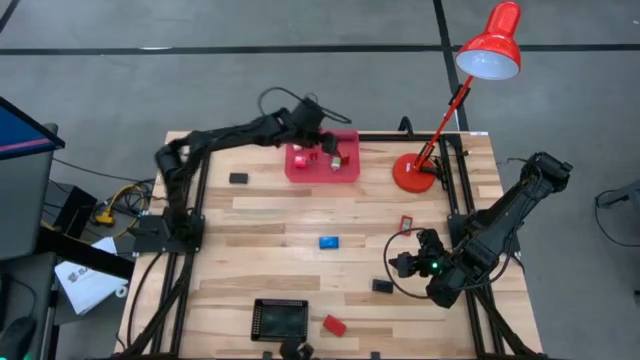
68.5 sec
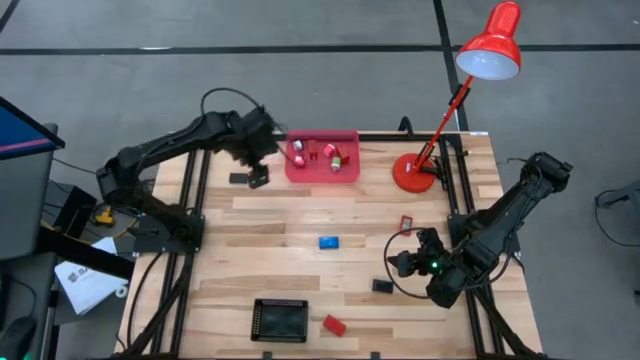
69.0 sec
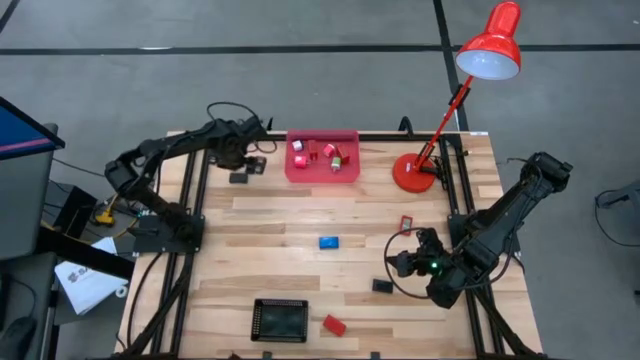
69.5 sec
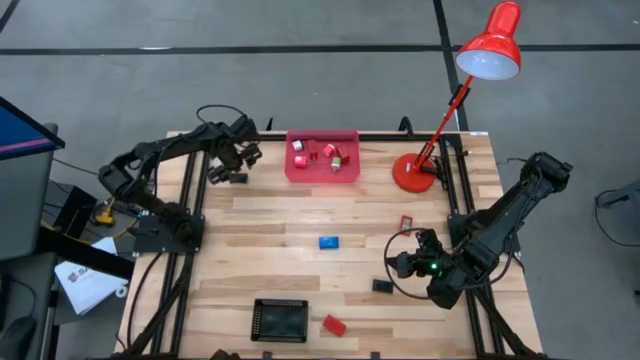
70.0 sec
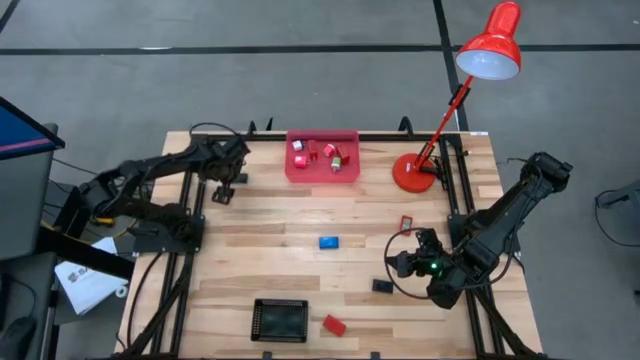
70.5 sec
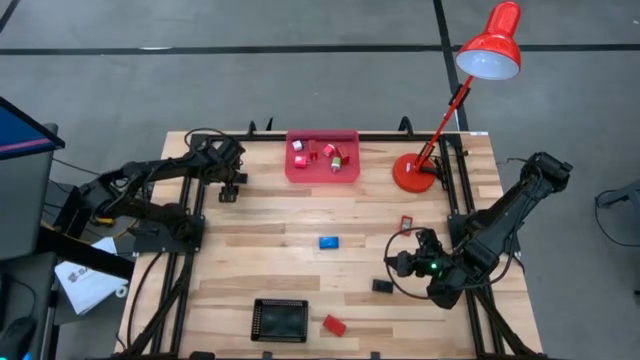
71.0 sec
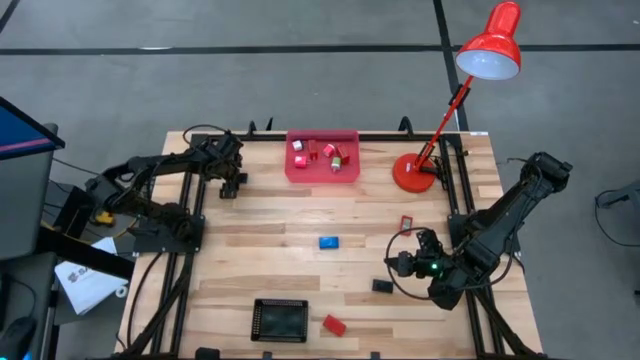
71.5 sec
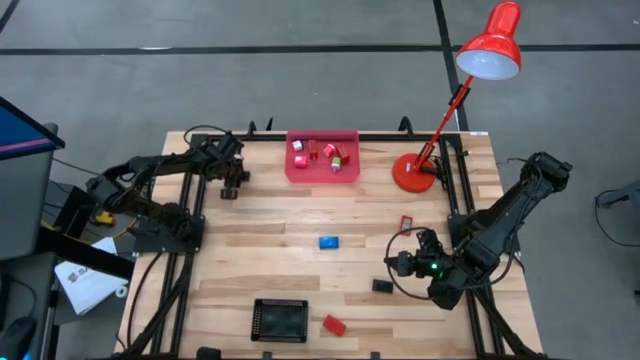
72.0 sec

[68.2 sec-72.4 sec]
Task: Pick & Place Office items
Put the top black digital timer into the black bin

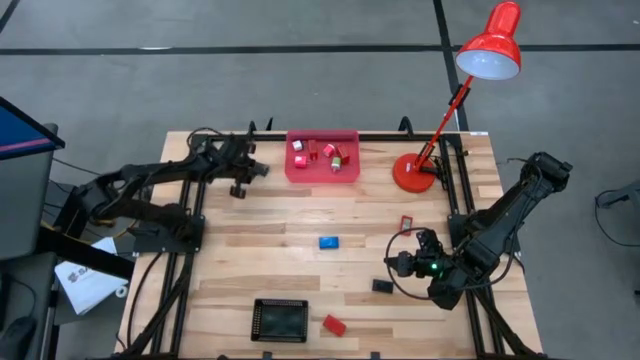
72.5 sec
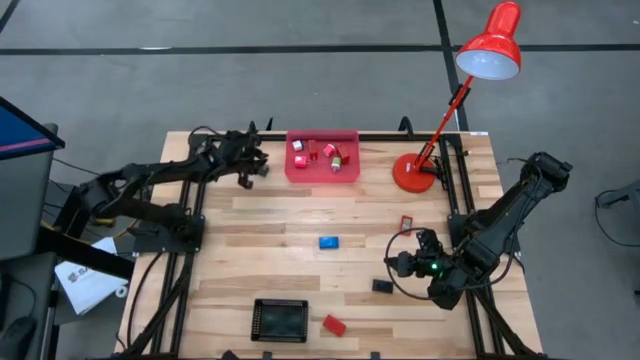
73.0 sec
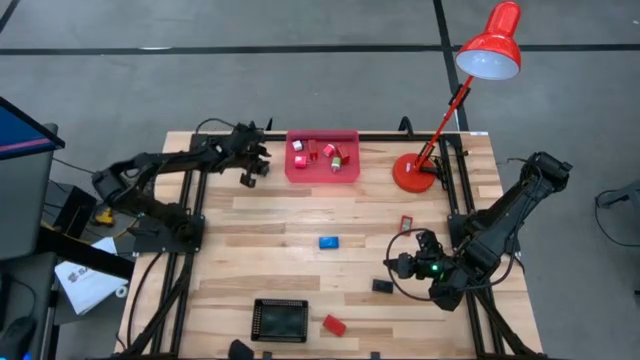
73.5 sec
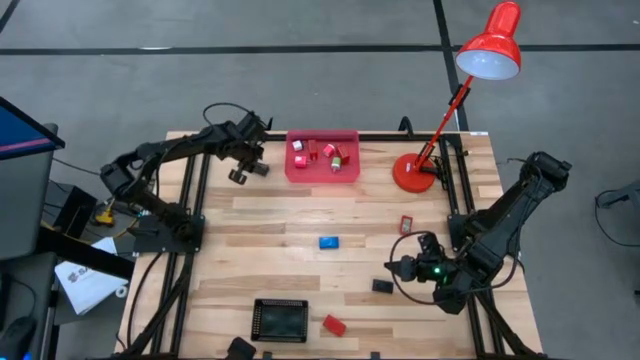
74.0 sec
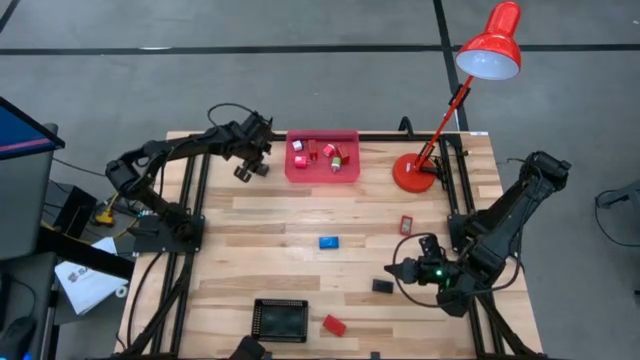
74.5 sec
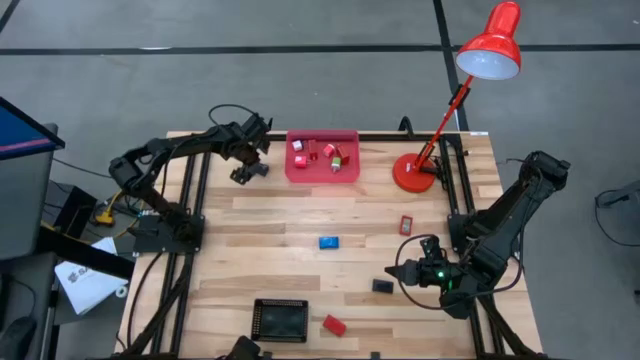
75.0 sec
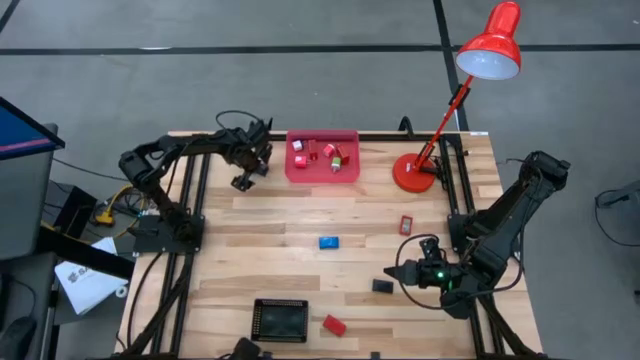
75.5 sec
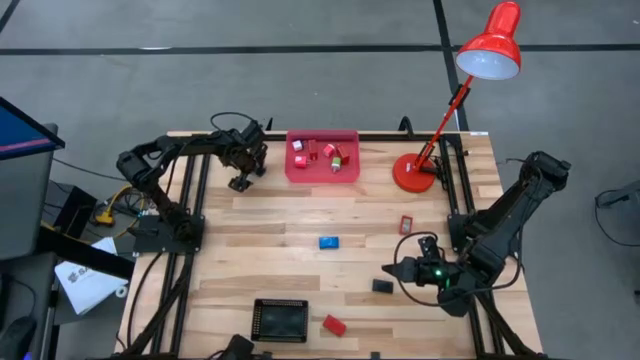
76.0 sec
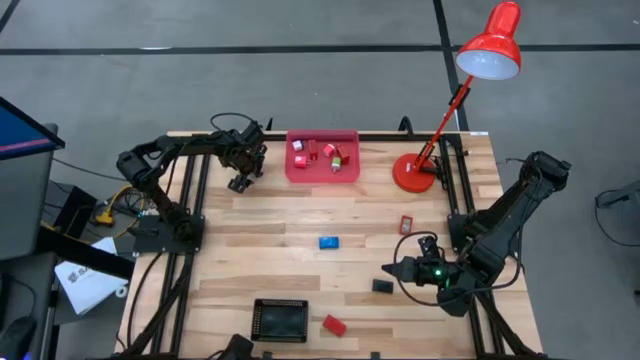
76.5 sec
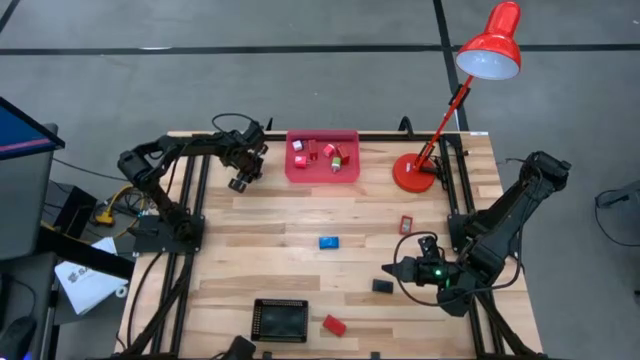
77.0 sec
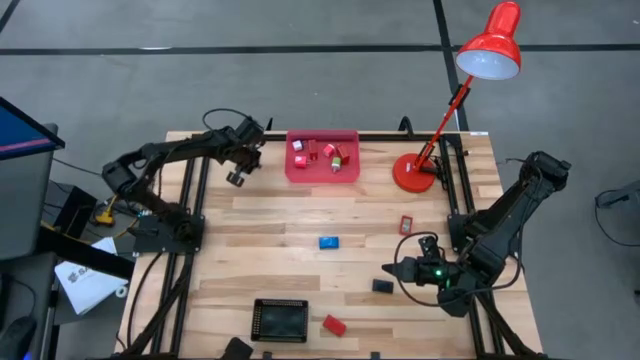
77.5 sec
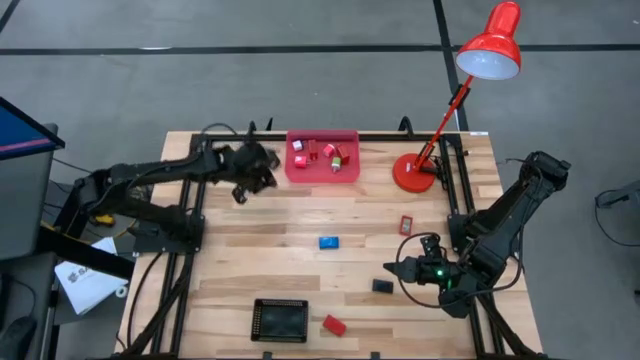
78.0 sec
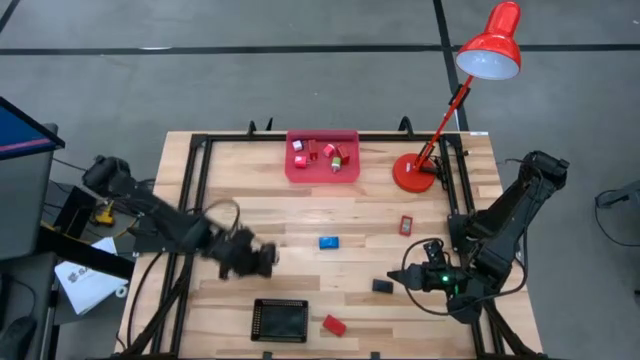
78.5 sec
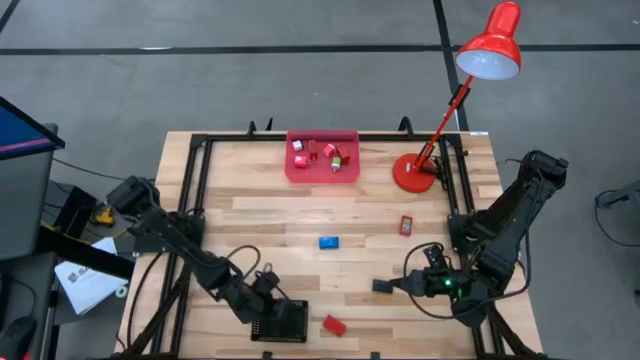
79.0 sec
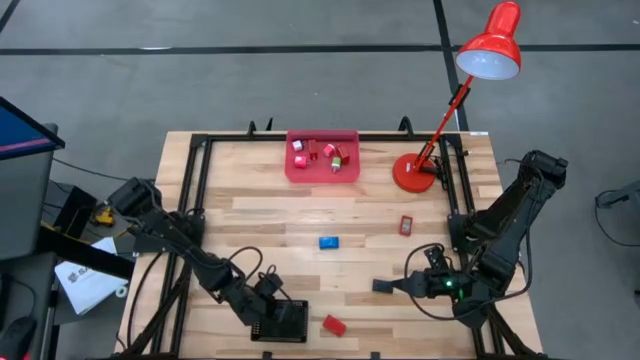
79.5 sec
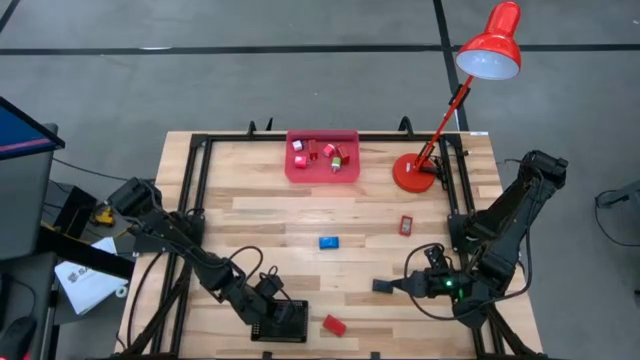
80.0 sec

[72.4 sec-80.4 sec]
Put the top black digital timer into the black bin

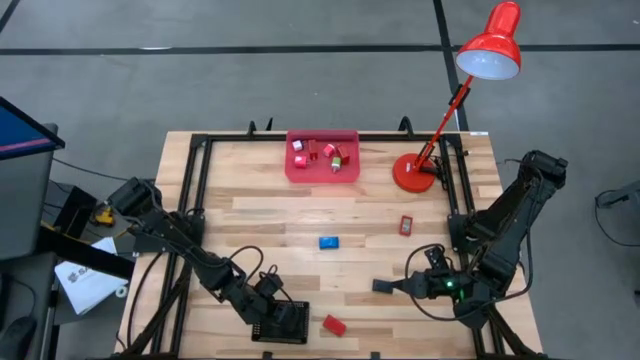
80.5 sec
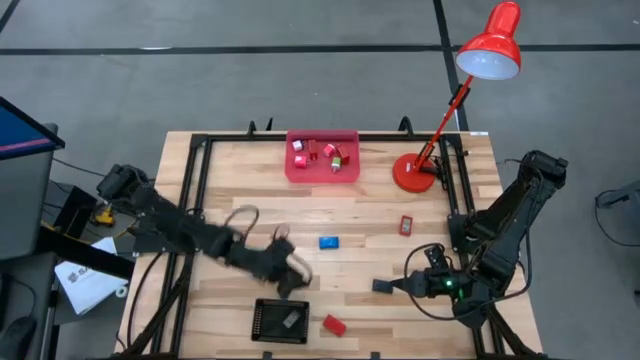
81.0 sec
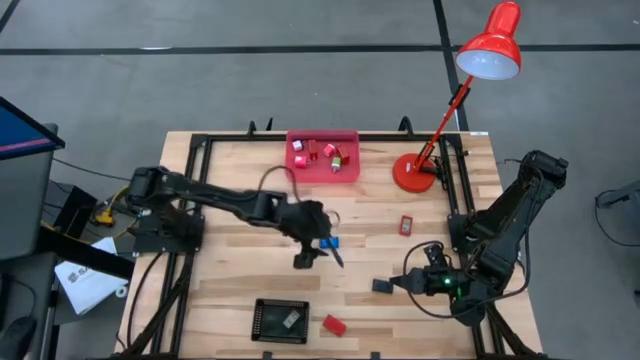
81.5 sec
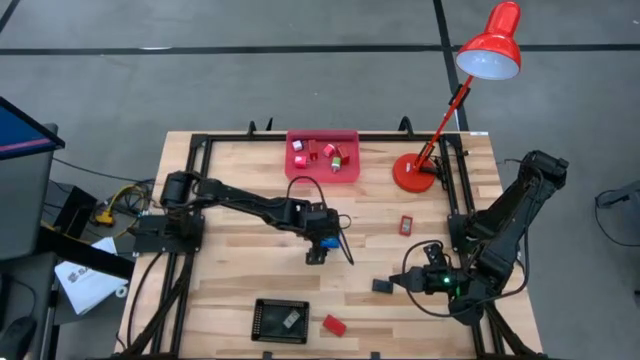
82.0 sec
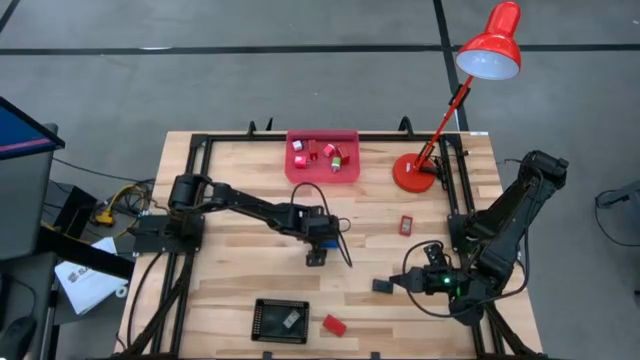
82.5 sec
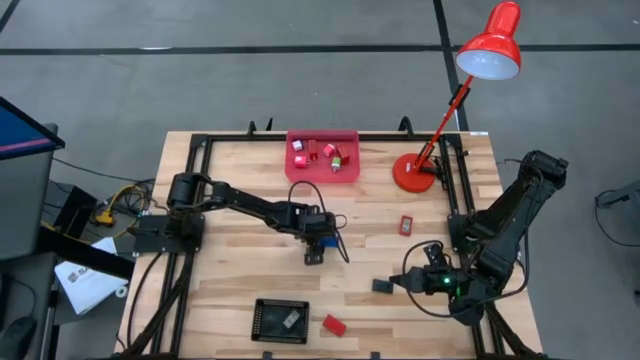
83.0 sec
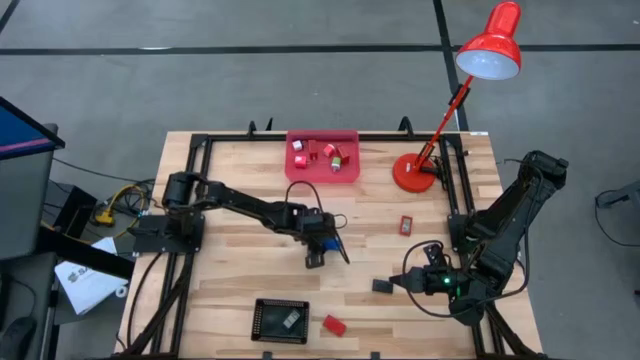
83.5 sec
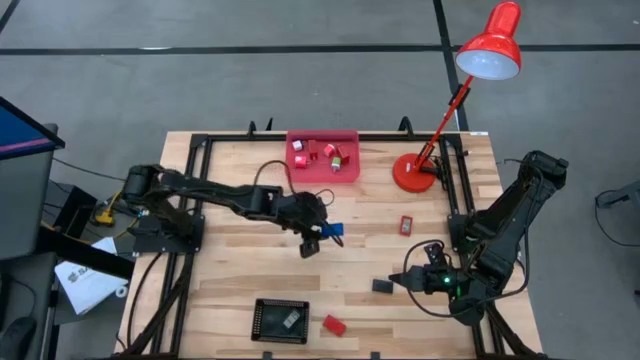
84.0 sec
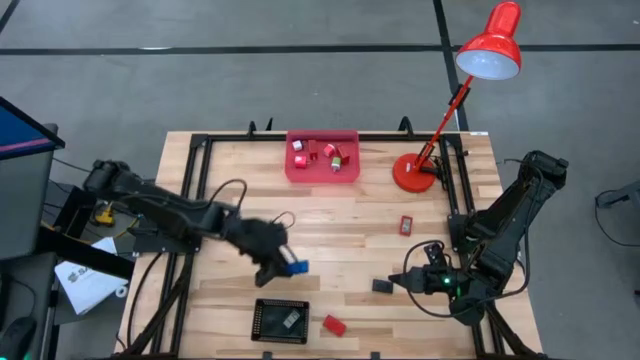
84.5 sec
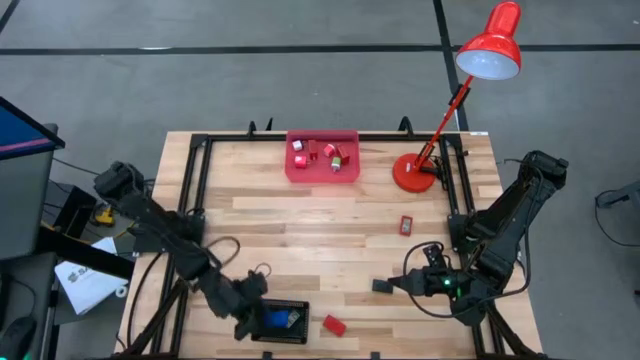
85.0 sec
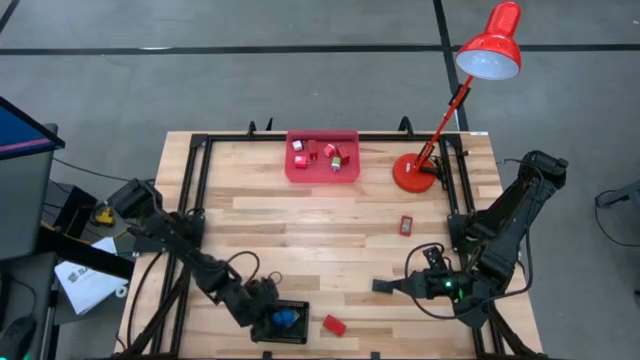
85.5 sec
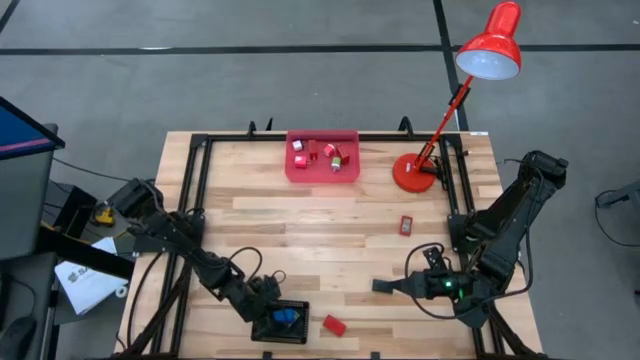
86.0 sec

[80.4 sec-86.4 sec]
Put the blue digital timer into the black bin
